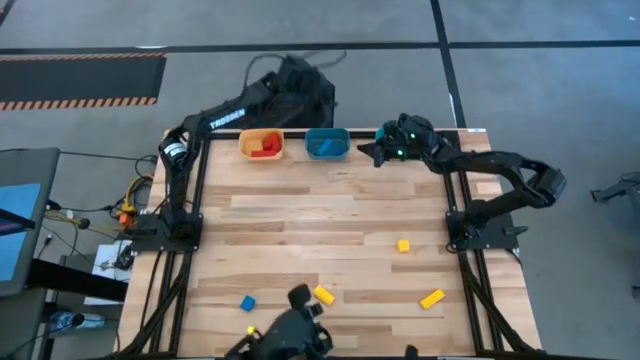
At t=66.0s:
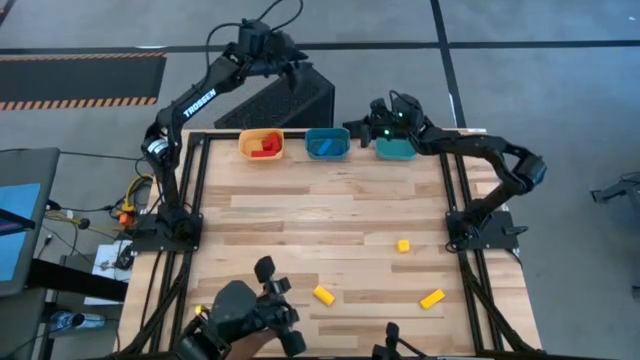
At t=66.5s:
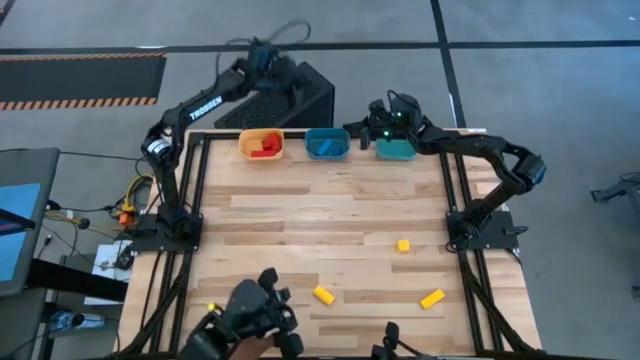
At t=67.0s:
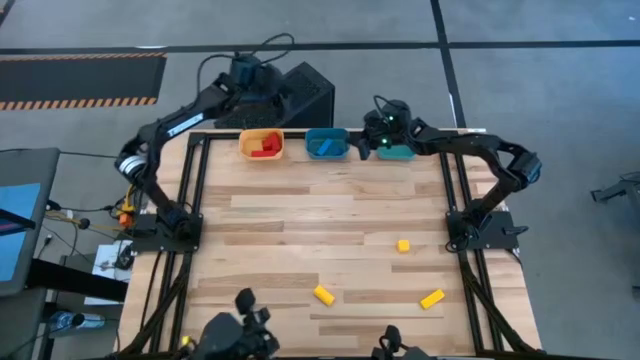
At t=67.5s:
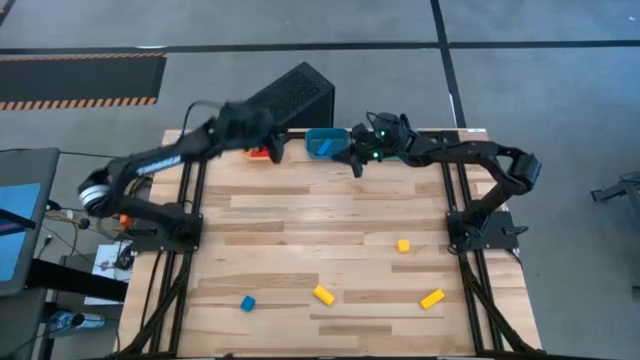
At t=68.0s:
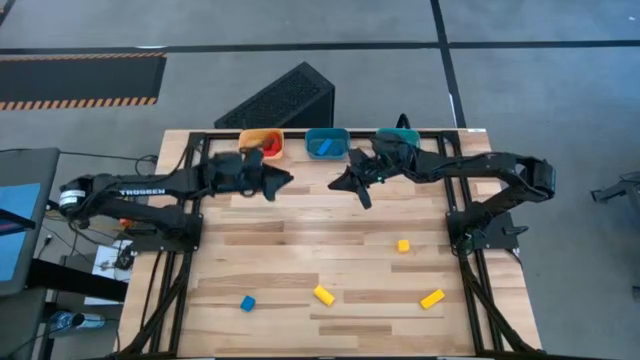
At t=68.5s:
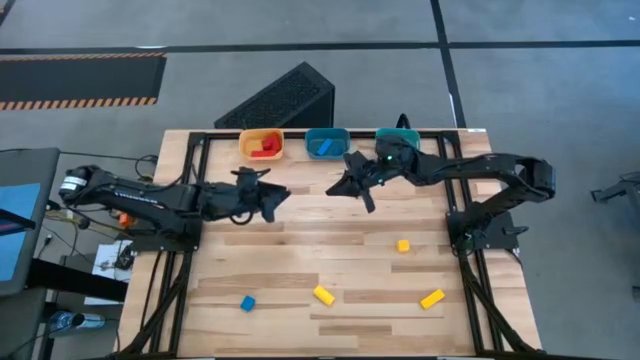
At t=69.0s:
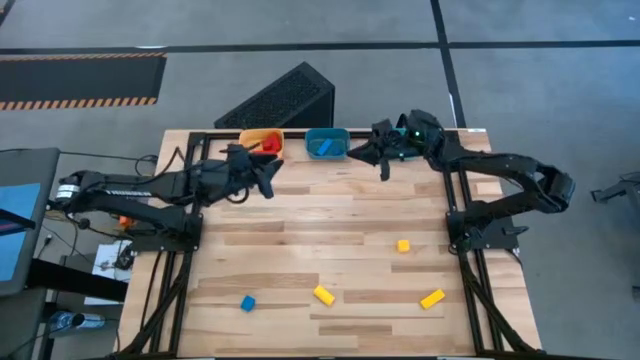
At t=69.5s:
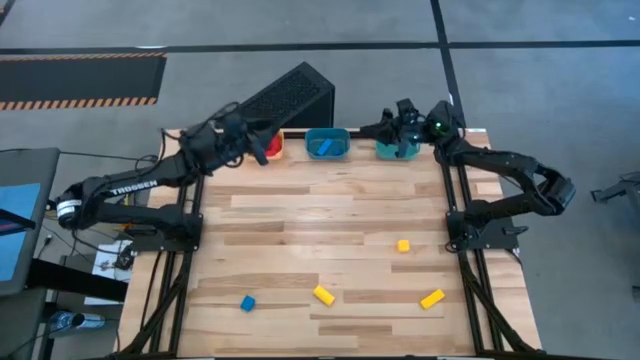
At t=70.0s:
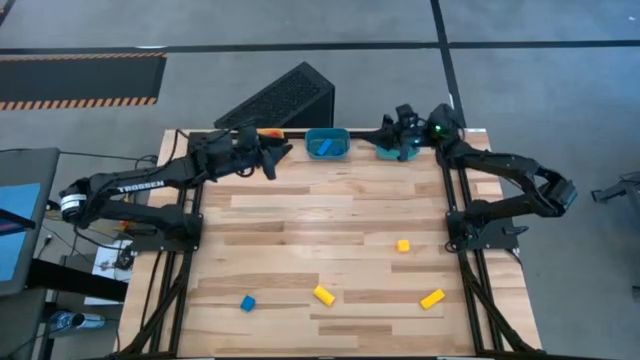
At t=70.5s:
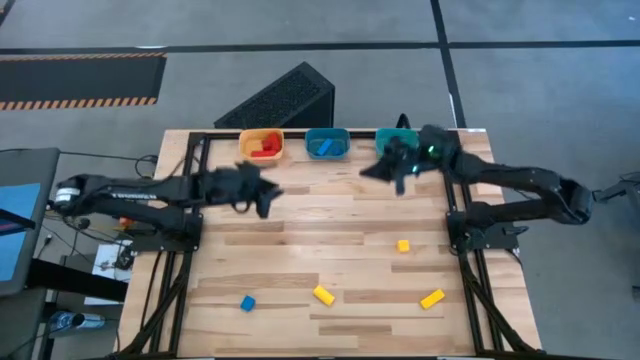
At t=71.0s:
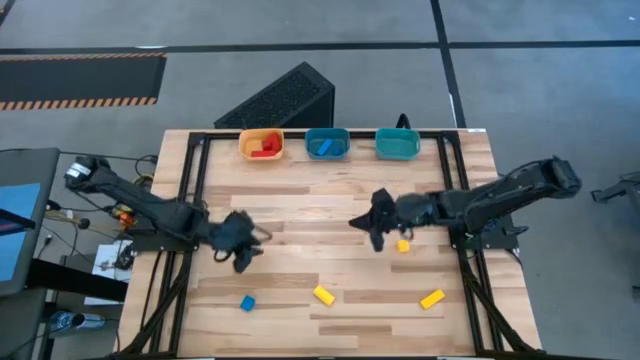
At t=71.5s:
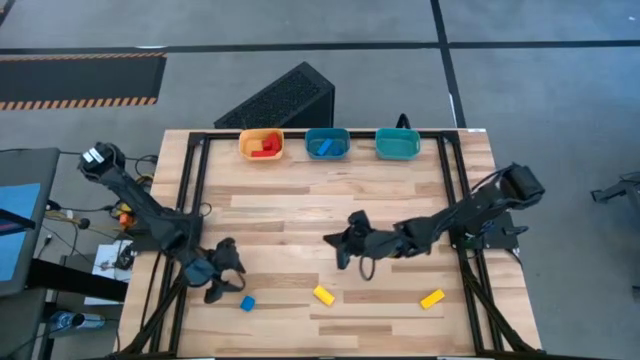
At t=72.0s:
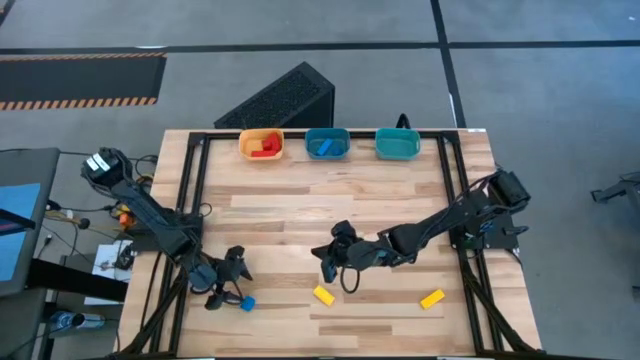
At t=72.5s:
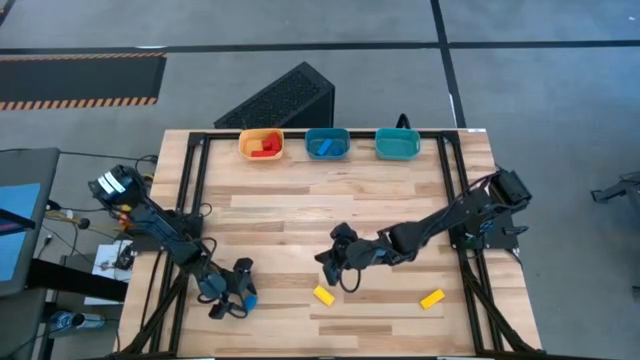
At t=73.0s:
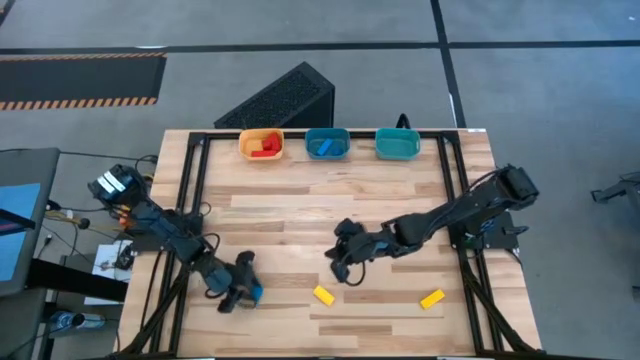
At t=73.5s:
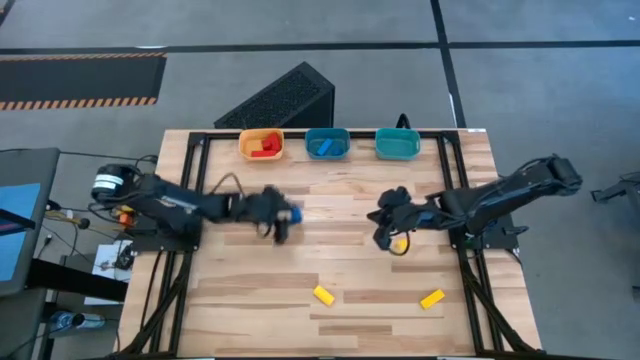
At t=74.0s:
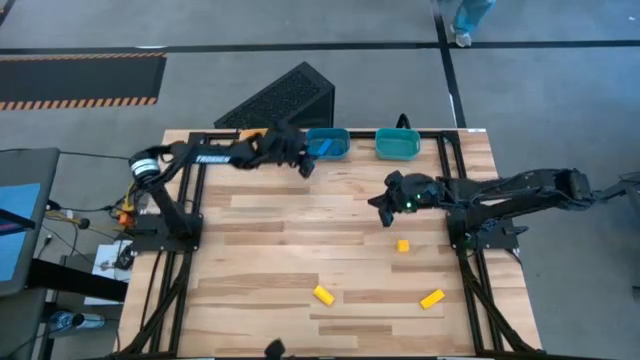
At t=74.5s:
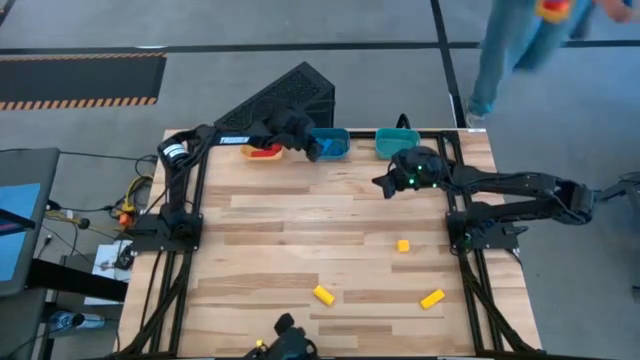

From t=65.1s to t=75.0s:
Task: Sort & place blocks by color
Put the blue block into the blue container

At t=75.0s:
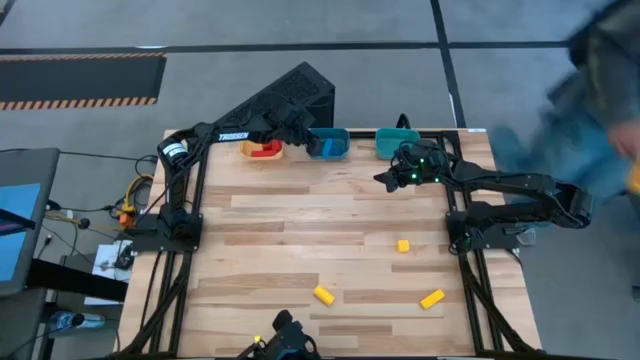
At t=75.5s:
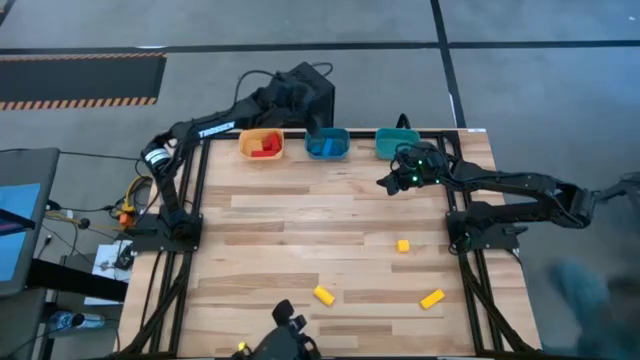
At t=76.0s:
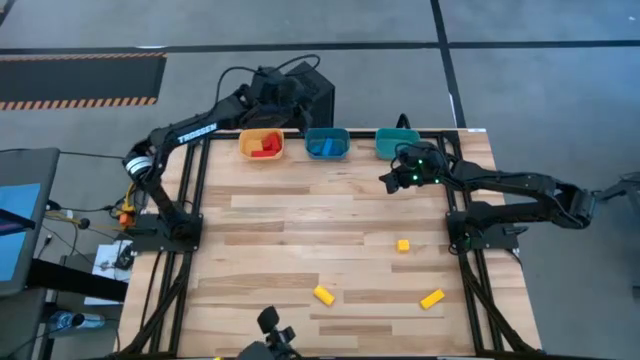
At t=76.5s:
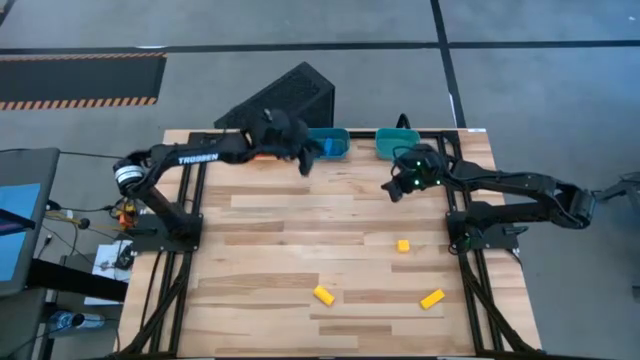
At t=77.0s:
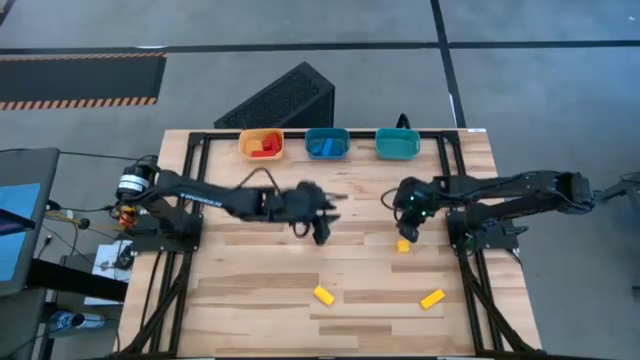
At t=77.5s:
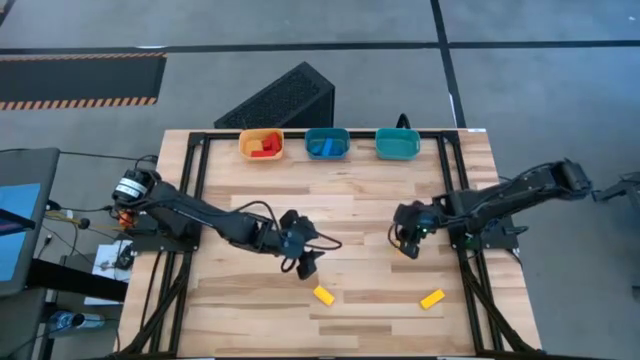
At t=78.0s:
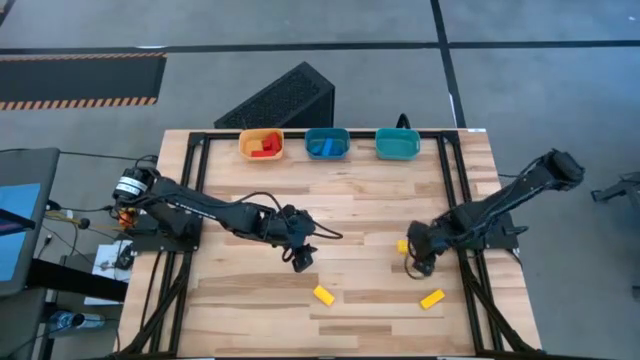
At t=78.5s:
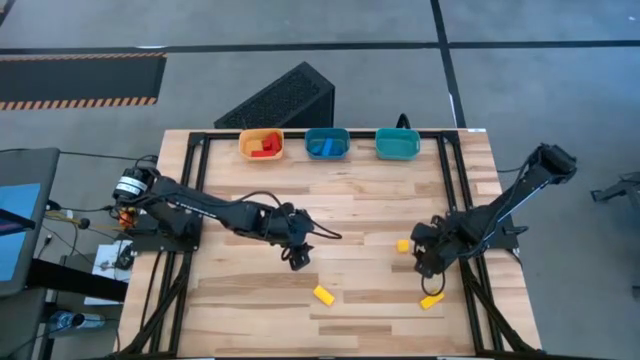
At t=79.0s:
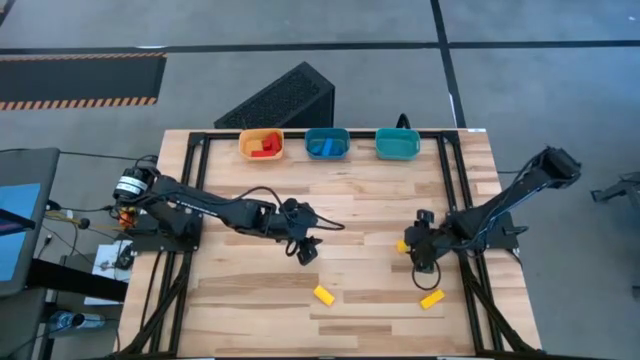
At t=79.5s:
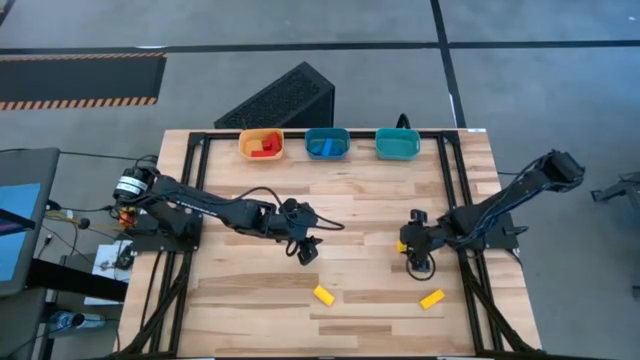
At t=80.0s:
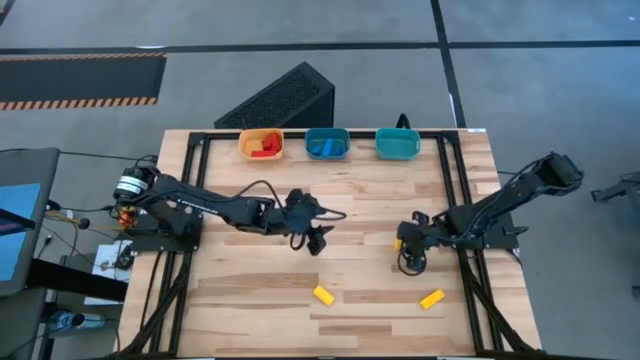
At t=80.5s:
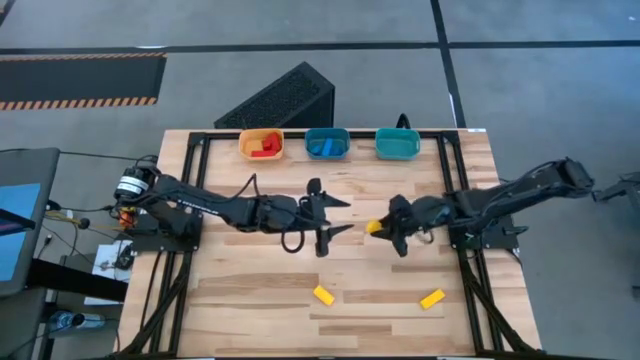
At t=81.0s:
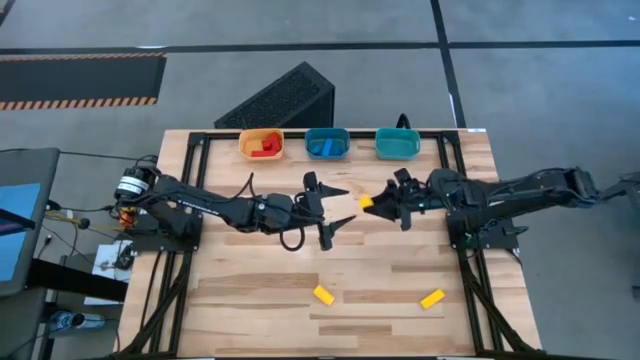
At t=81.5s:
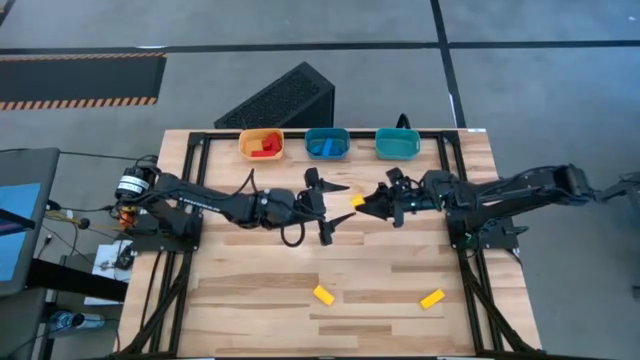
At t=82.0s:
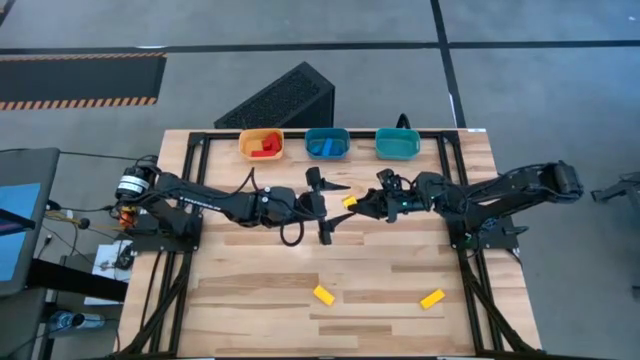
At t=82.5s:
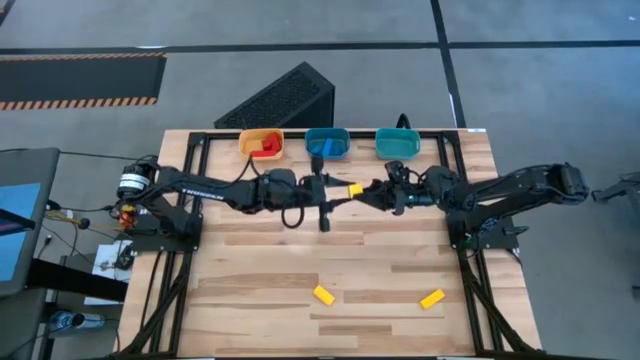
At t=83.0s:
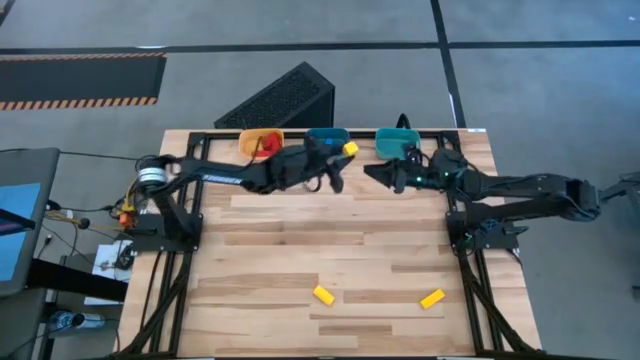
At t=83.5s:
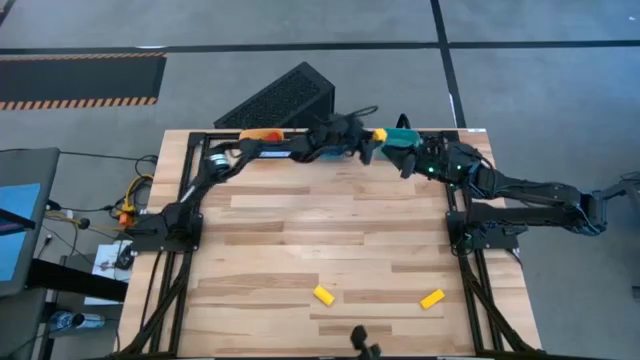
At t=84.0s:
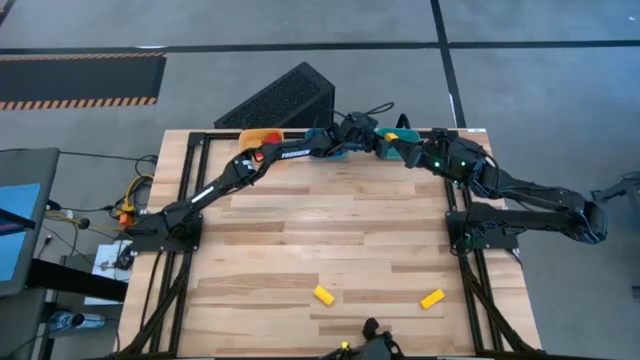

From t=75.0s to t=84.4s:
Put the top right yellow block into the light green container

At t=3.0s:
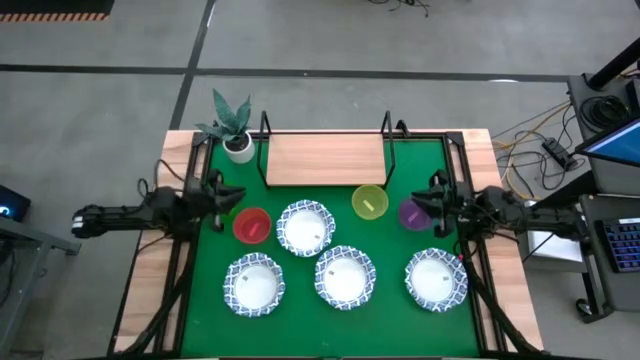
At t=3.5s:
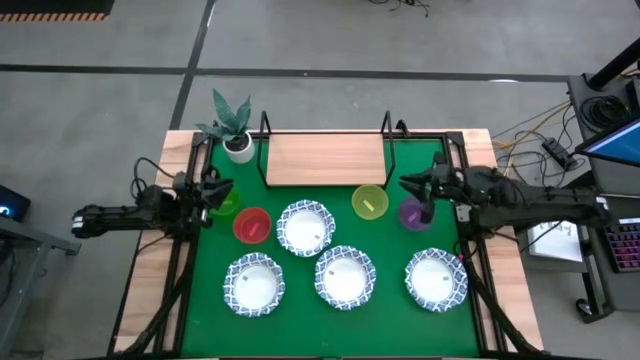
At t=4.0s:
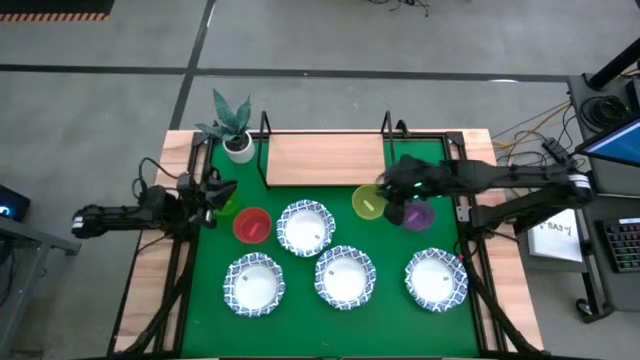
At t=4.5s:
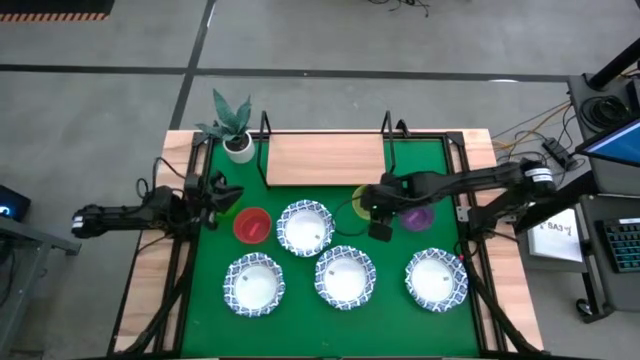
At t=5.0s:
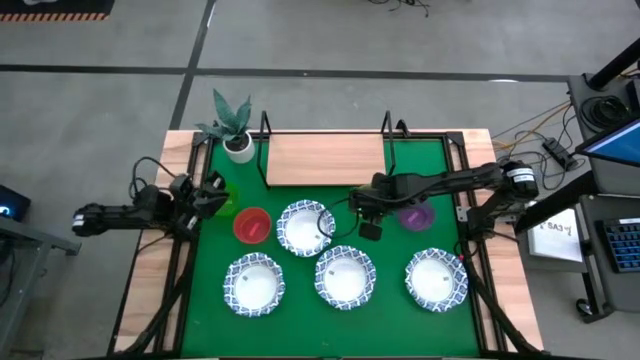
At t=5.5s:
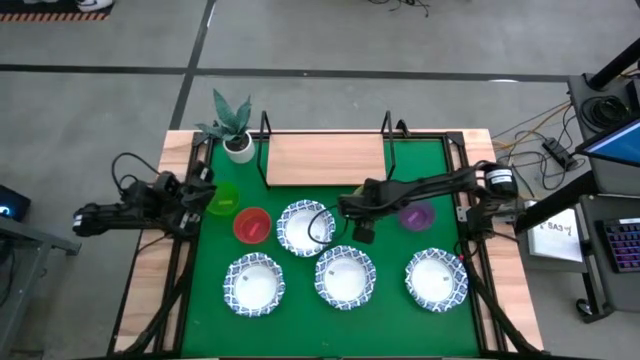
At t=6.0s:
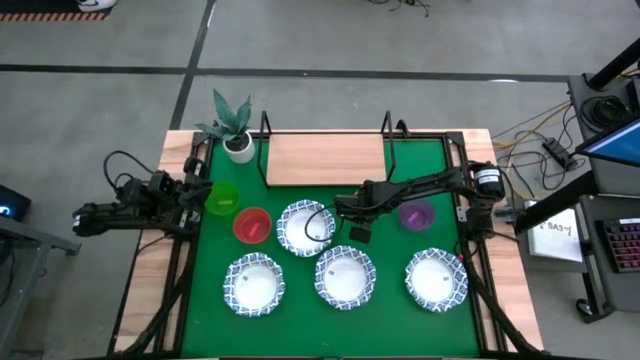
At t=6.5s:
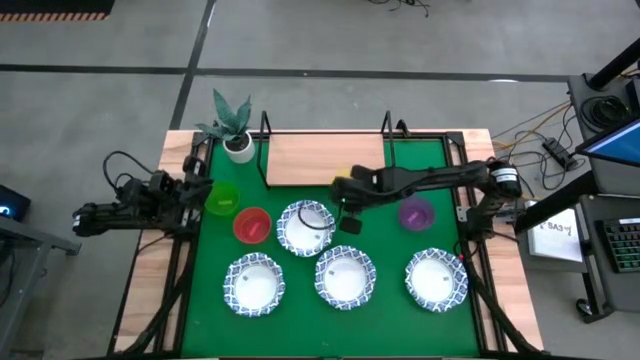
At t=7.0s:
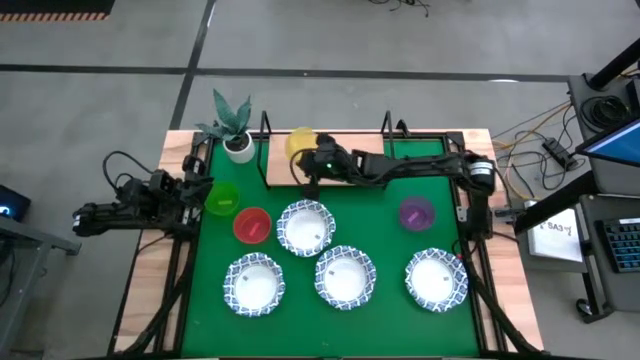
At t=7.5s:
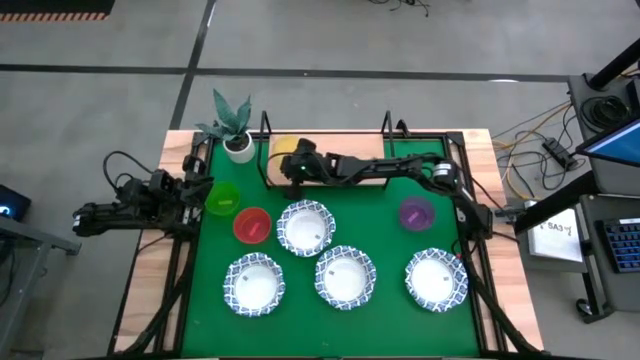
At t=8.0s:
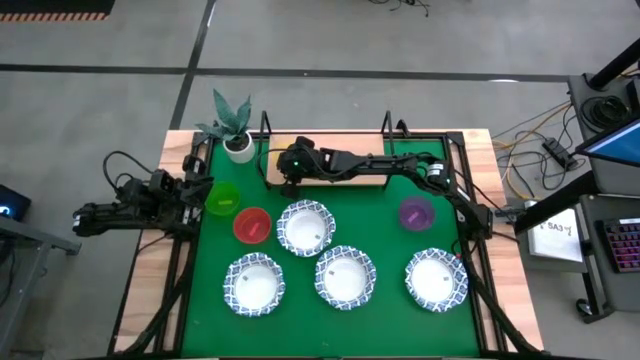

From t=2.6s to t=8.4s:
Task: Place and stack bowls onto a shelf
Put the transparent yellow bowl on the shelf
